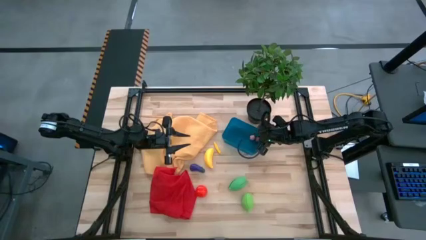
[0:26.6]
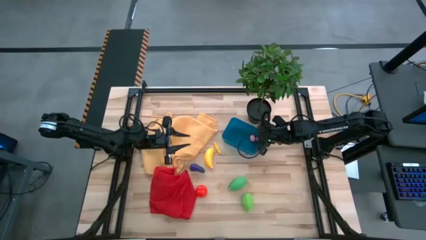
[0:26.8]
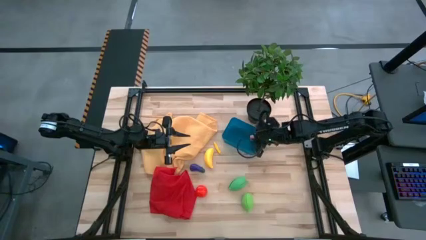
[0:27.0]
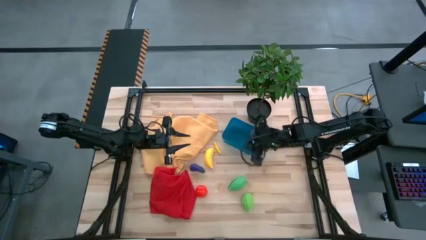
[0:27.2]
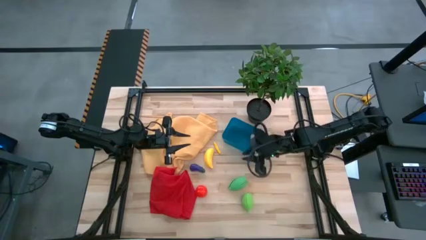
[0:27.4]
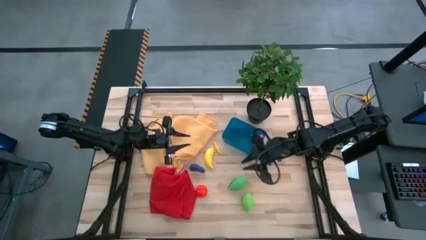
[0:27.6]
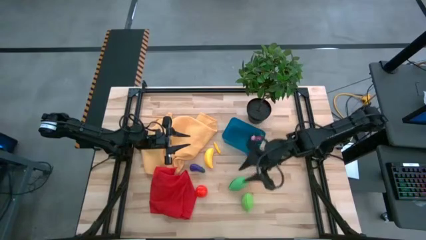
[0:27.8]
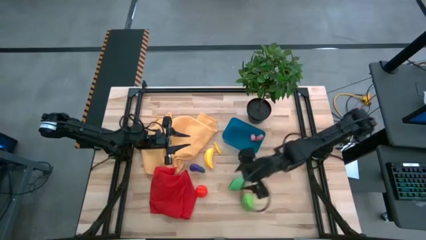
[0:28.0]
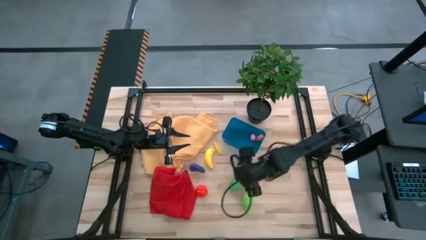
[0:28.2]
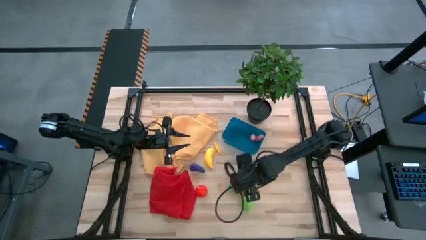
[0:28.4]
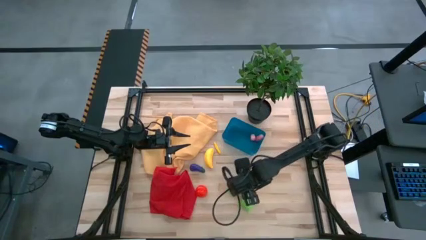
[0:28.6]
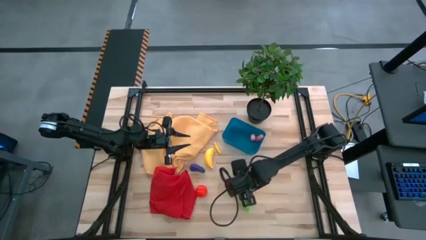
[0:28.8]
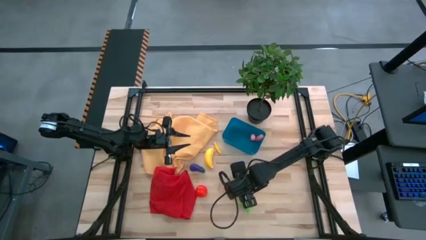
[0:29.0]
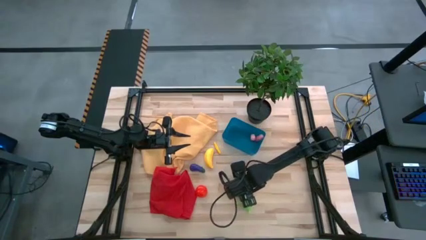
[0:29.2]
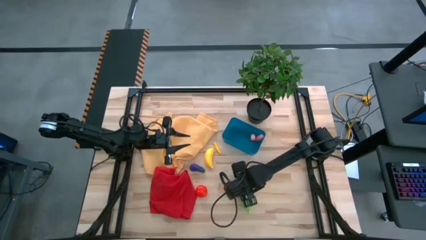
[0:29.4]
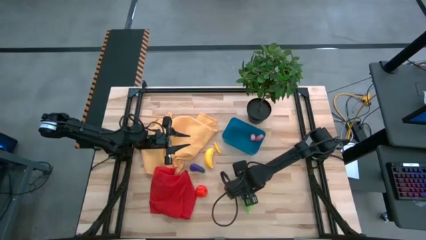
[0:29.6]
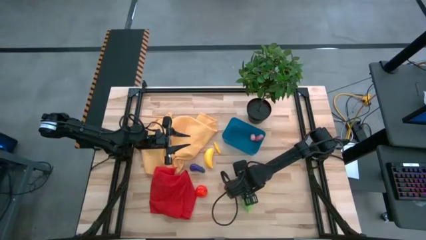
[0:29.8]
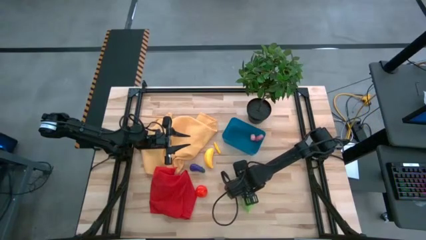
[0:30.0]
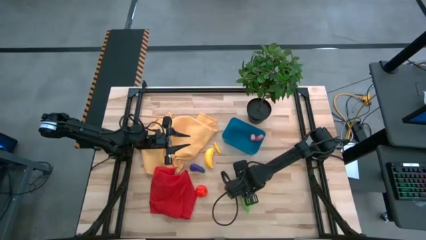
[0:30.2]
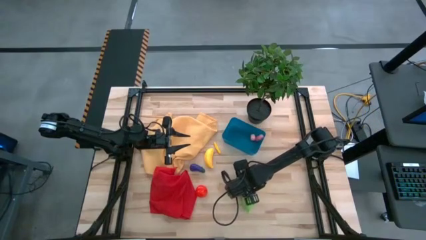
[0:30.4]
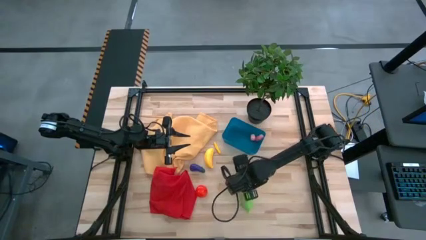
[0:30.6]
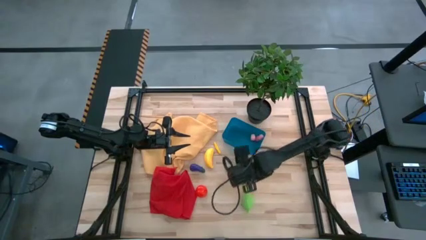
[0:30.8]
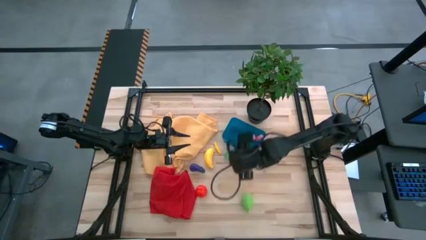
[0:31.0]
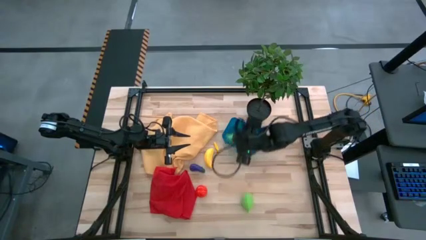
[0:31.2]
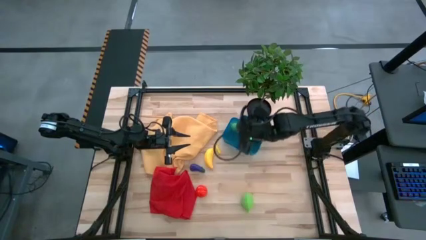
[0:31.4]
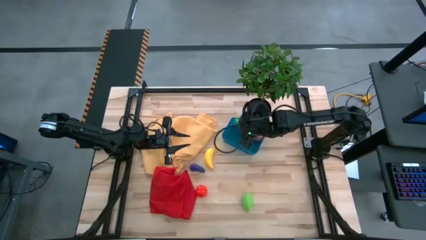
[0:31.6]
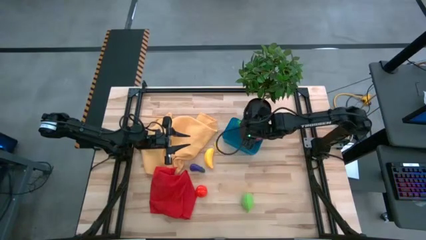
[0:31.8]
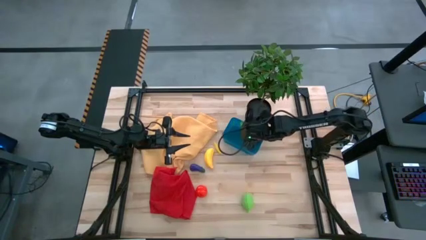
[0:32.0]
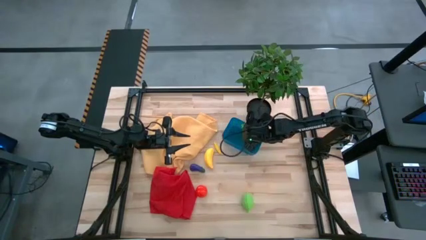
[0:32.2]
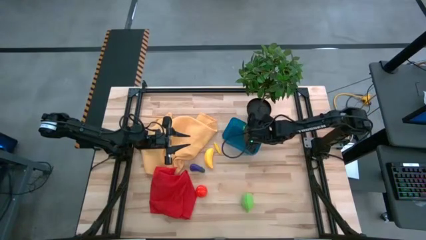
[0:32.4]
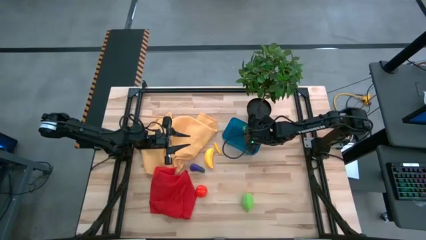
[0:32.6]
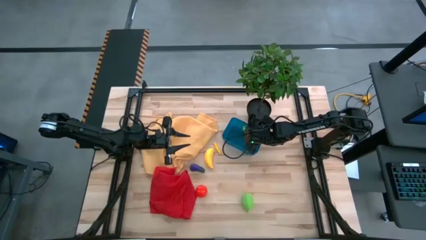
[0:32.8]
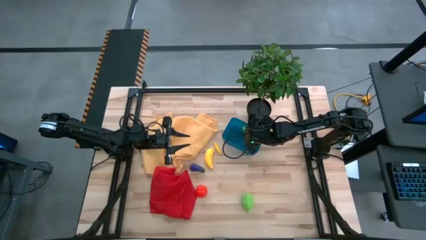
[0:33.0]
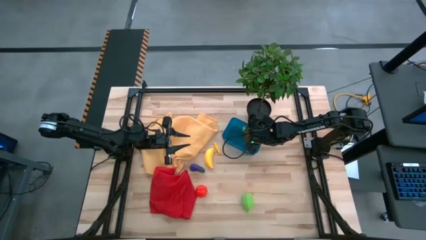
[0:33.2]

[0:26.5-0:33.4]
Task: Pick and placing Produce into tupperware
Put the green corn into the blue bin

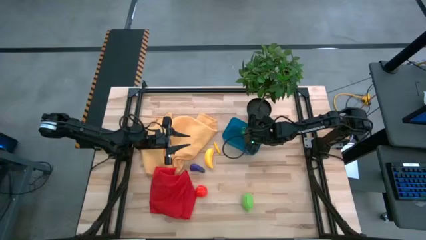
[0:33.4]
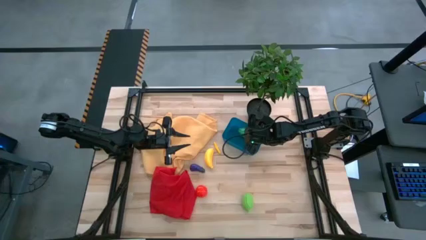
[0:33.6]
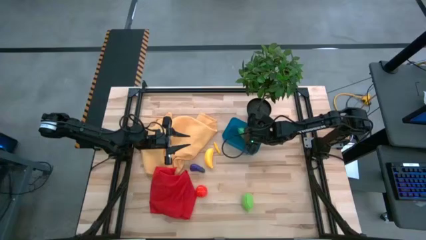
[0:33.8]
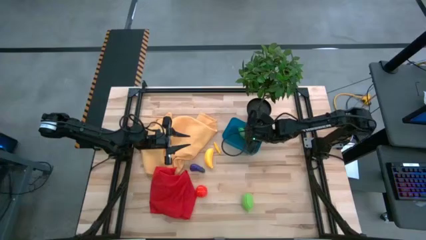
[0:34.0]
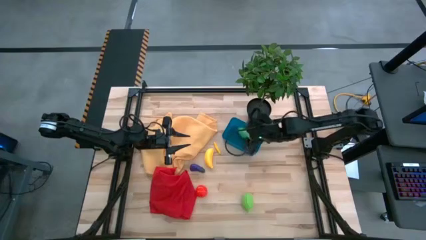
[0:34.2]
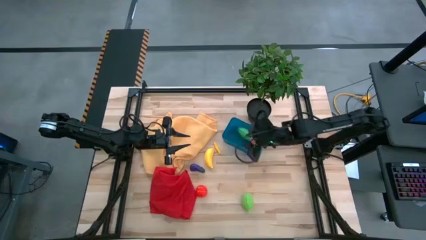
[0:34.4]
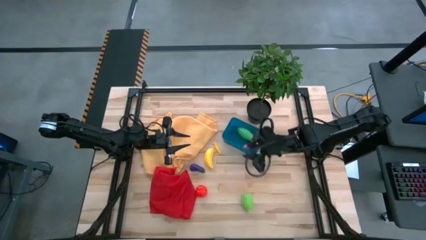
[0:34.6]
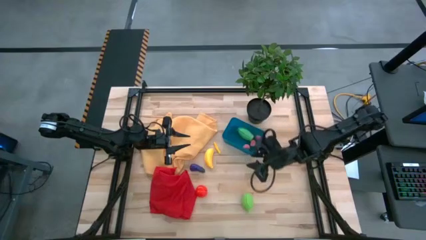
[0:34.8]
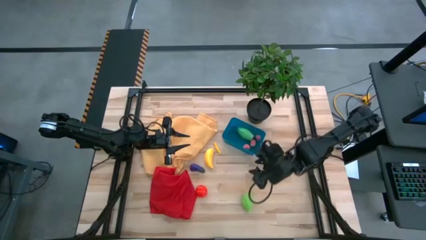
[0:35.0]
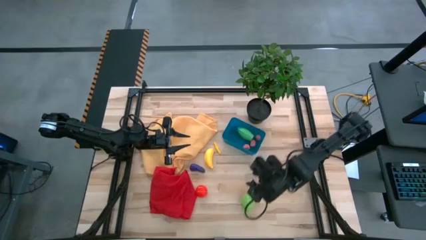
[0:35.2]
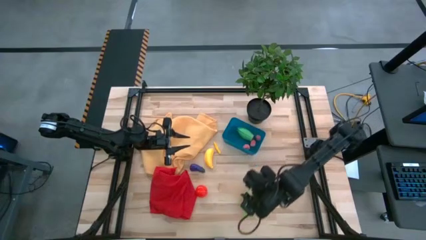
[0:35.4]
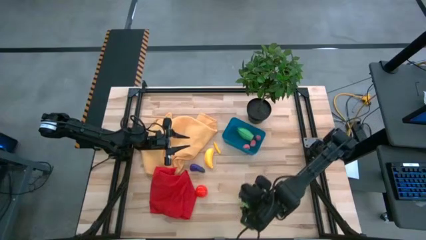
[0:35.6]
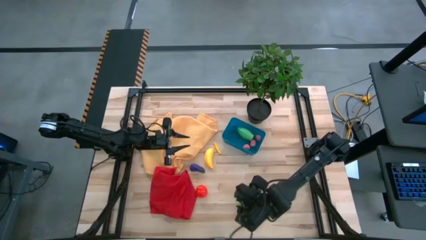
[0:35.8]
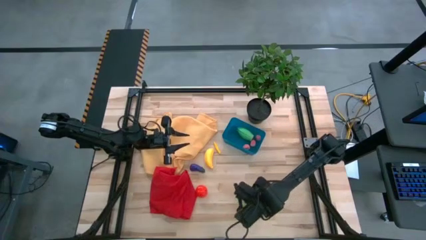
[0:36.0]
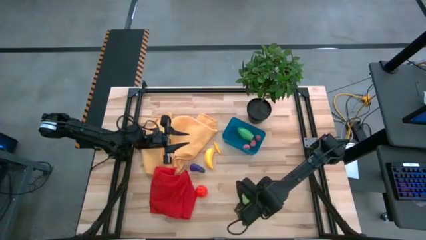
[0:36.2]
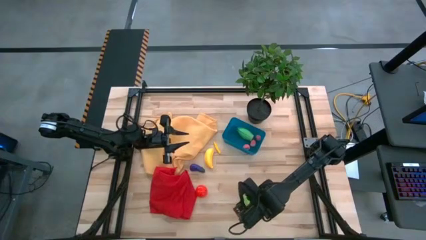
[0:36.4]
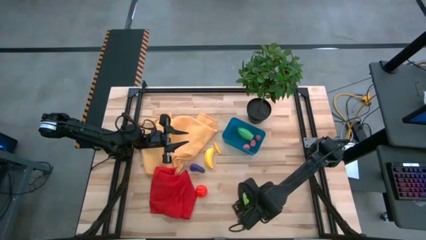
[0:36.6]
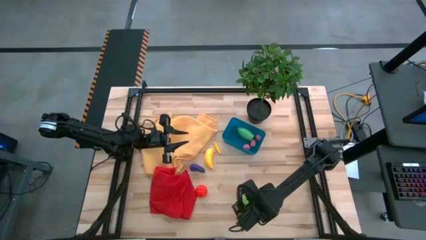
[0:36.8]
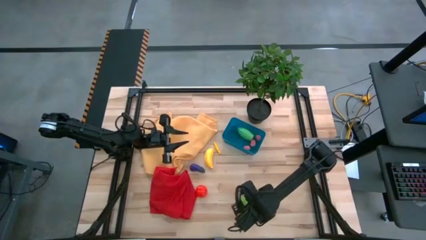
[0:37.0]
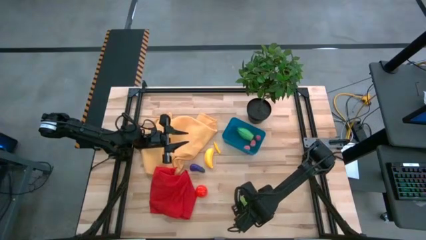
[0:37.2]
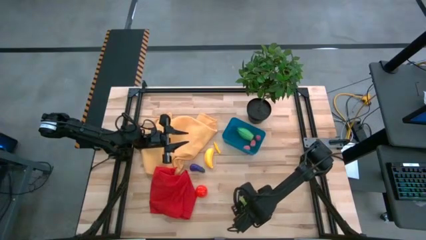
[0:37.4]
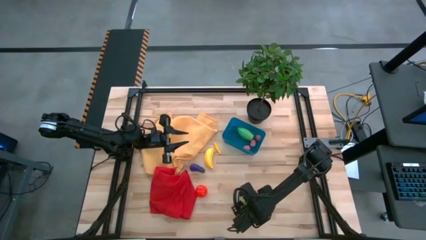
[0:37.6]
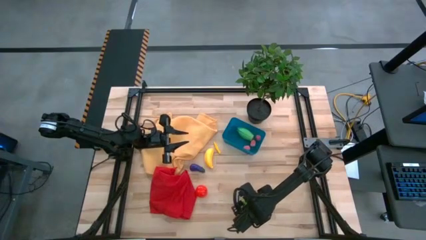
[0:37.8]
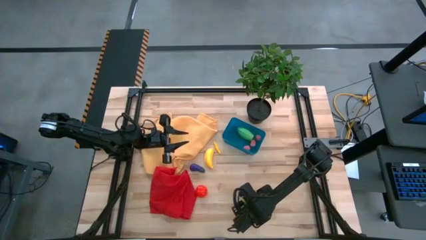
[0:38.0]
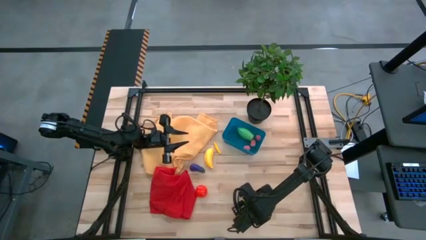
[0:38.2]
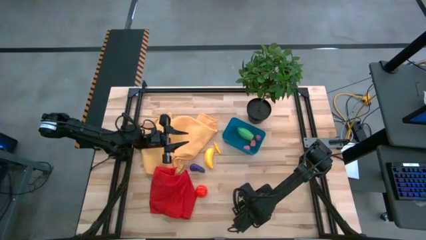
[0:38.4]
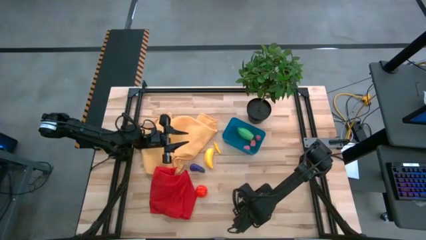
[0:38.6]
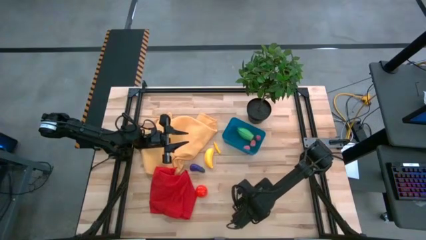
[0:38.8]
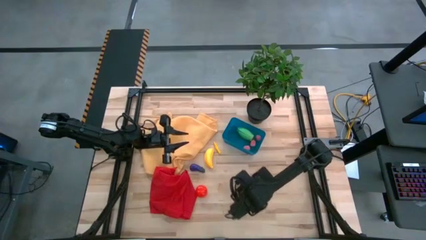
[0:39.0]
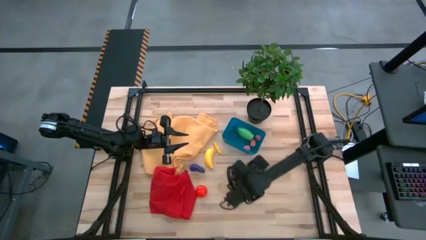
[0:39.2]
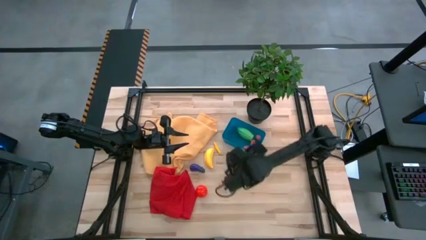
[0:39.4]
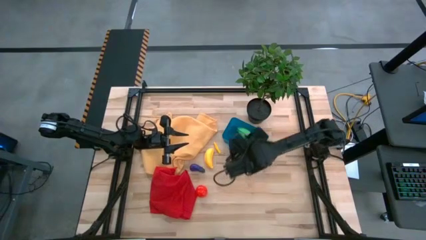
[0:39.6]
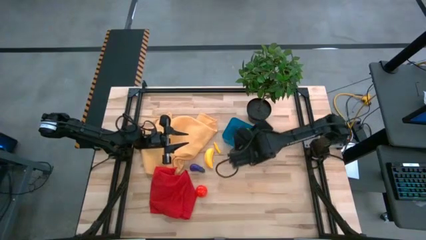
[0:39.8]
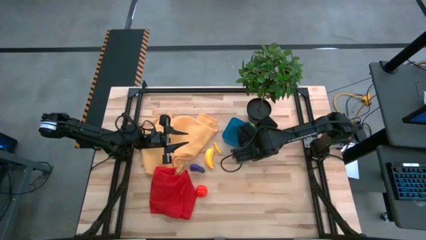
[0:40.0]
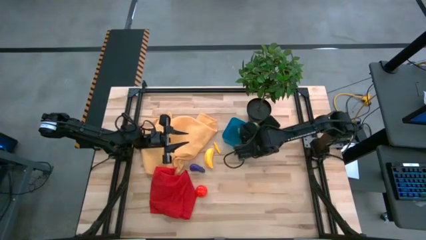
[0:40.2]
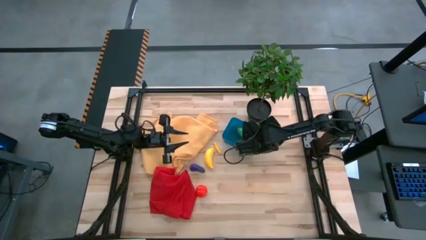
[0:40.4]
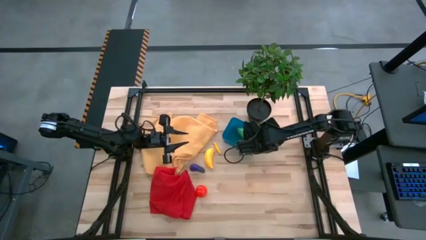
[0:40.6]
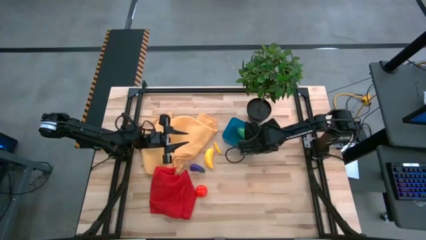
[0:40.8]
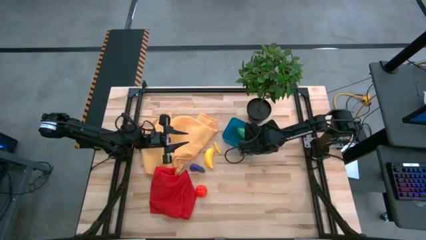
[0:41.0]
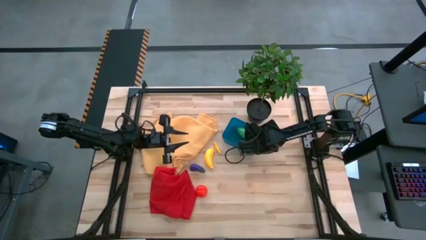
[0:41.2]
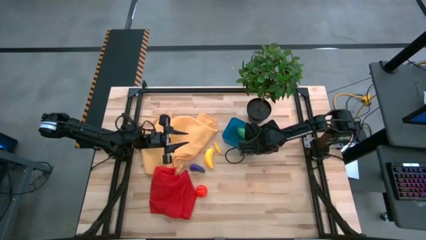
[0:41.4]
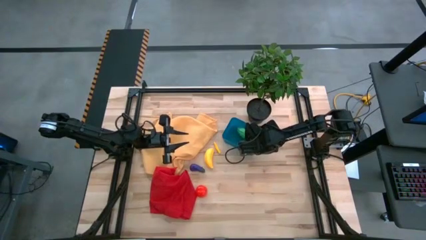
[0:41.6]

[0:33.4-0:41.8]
Put the green melon into the blue bin

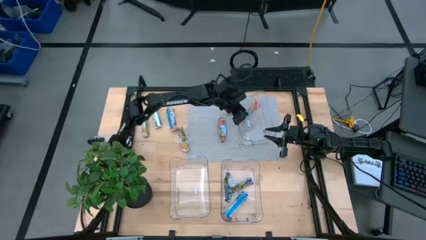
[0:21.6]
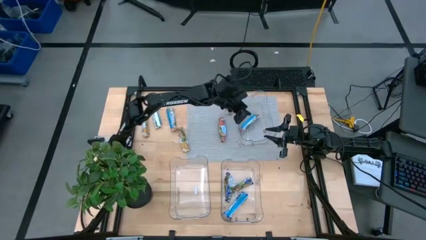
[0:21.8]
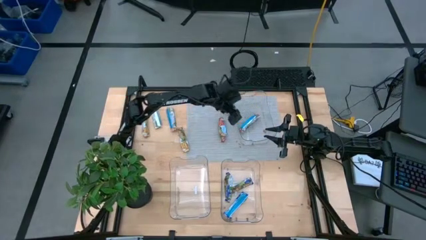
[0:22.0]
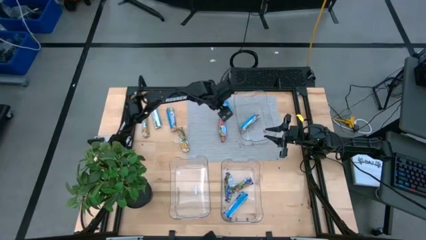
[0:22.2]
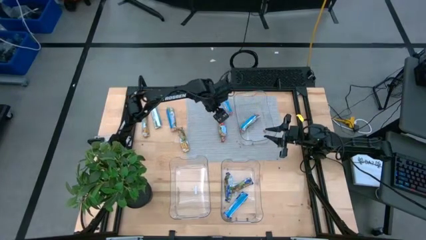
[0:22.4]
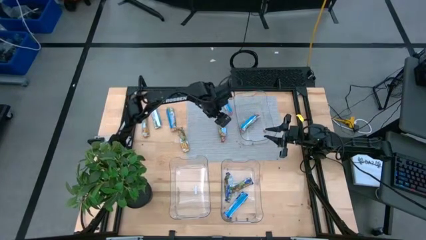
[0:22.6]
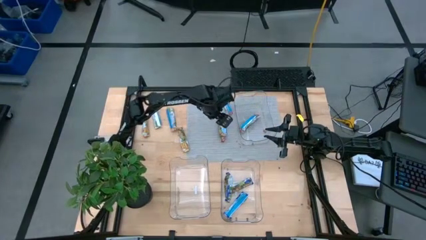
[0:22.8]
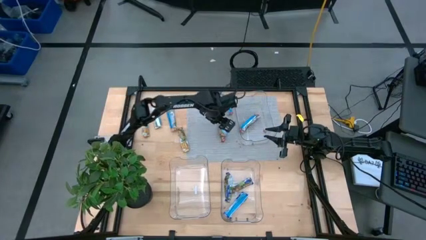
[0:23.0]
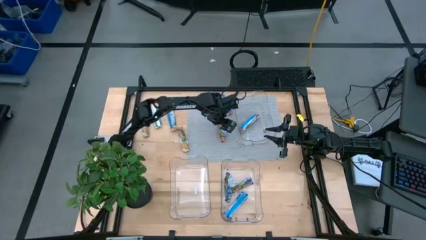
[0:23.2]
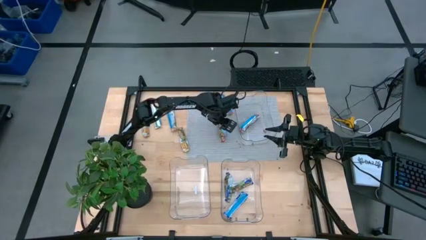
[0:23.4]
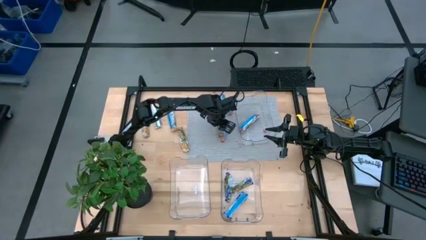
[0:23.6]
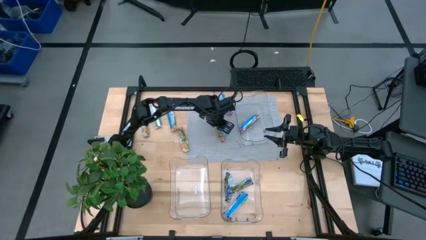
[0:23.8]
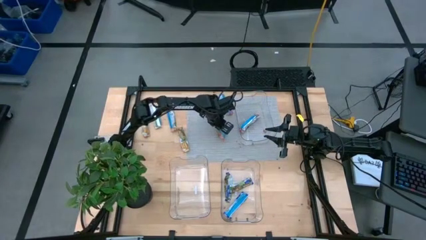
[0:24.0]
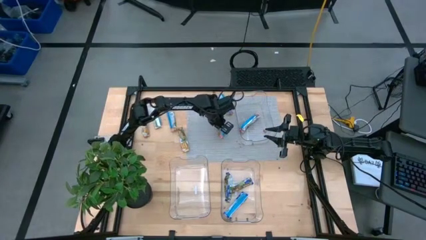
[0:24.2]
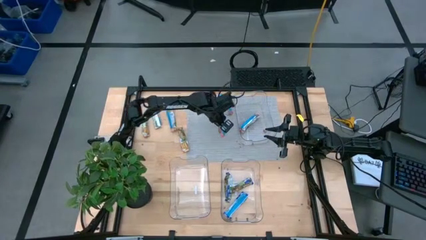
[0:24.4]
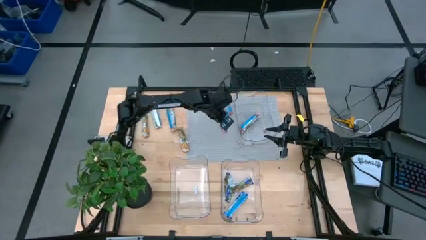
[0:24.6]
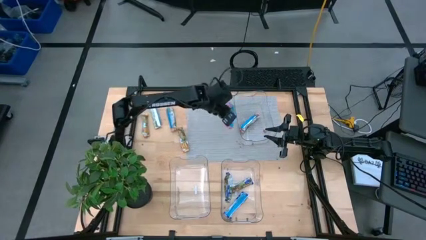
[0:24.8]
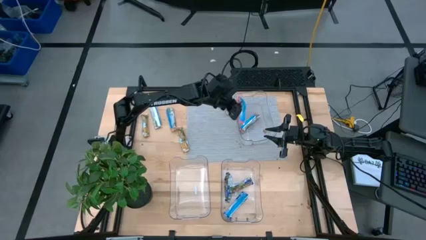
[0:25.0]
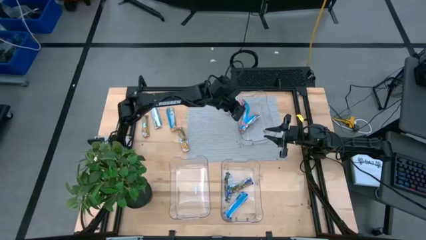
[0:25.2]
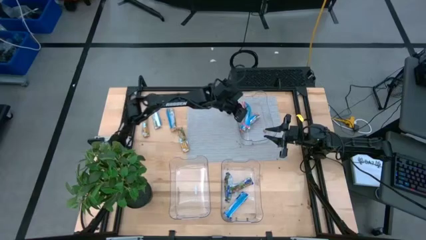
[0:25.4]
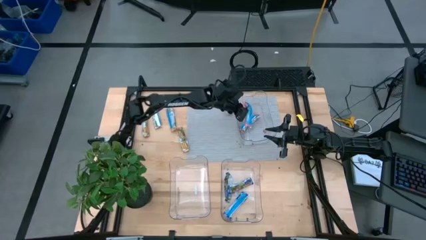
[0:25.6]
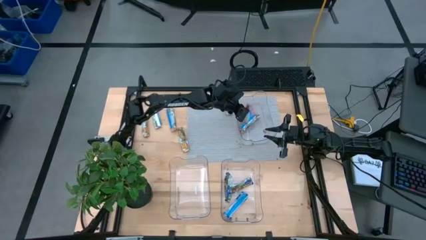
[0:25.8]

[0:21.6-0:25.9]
Task: Pick and place Granola Bars by type
Put the bottom red granola bar into the top transparent bin
